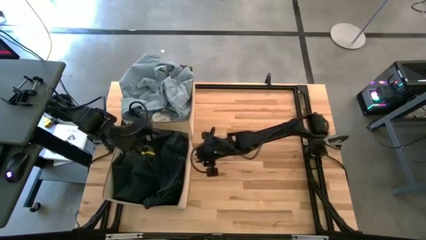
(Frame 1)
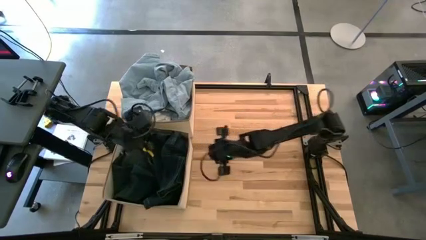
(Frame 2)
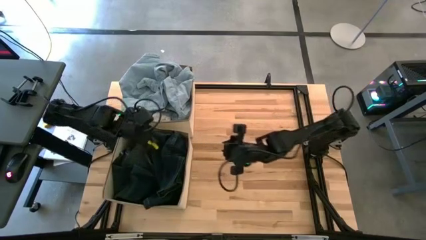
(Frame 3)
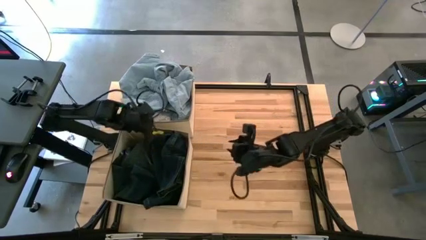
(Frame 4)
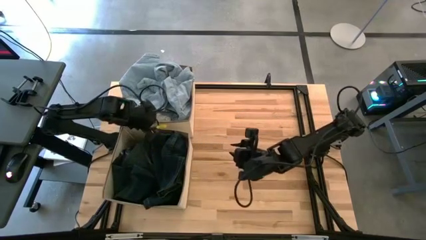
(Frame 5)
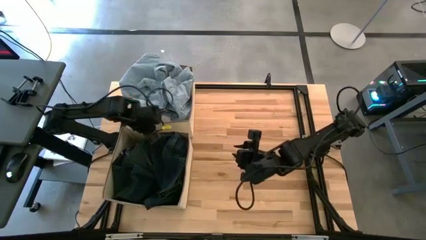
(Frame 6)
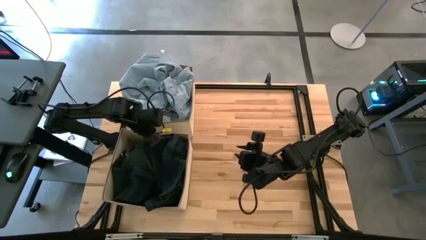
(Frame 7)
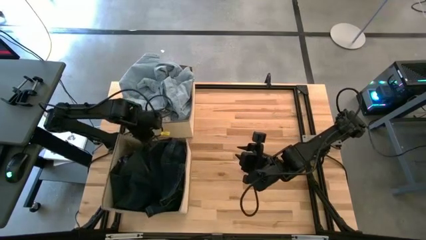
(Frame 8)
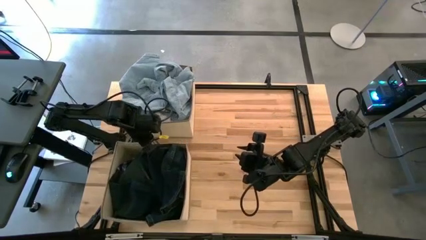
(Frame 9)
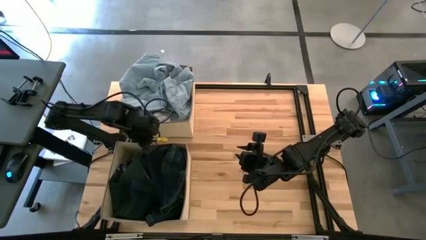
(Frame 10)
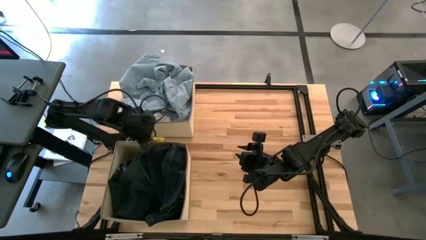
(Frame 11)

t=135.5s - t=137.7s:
Task: Sort clothes
Move the laundry organizer to the bottom

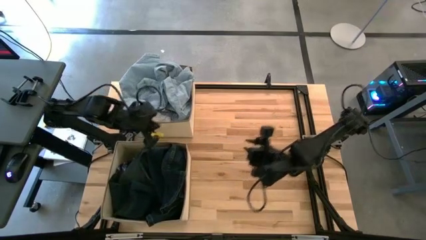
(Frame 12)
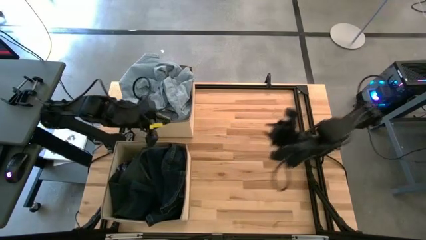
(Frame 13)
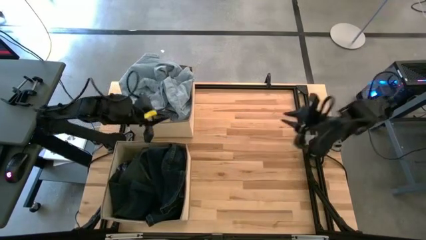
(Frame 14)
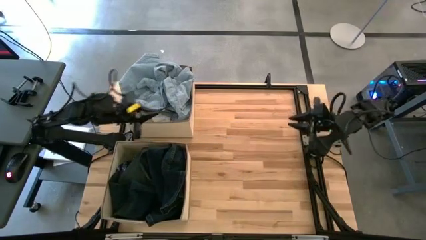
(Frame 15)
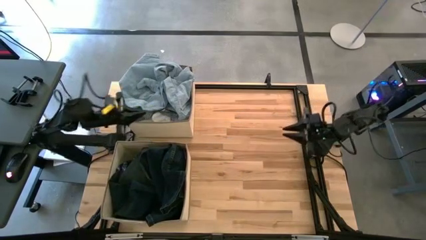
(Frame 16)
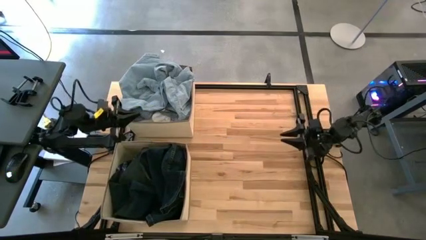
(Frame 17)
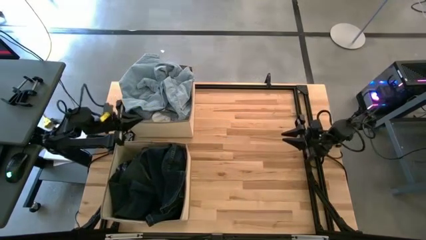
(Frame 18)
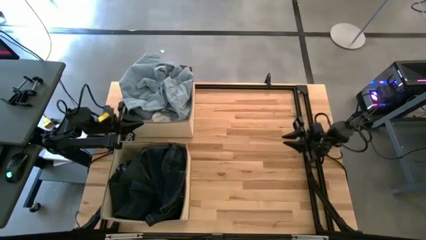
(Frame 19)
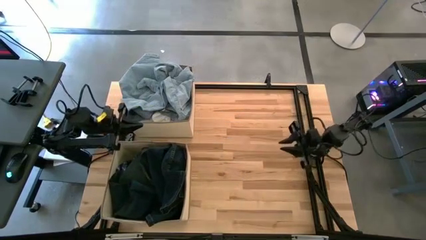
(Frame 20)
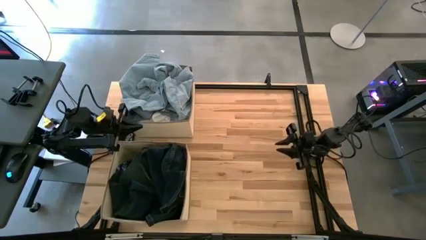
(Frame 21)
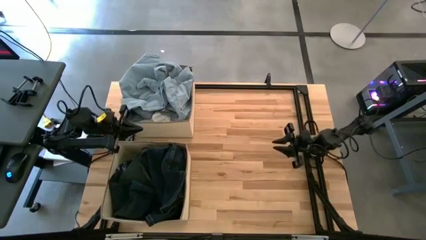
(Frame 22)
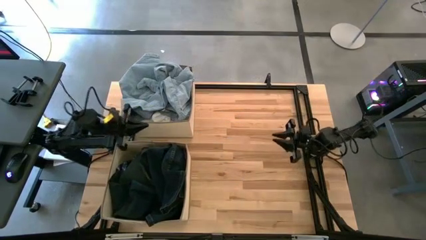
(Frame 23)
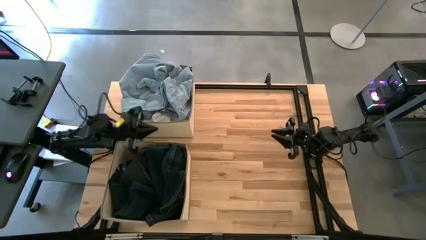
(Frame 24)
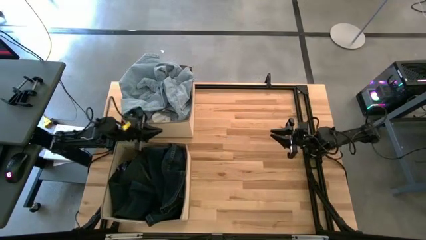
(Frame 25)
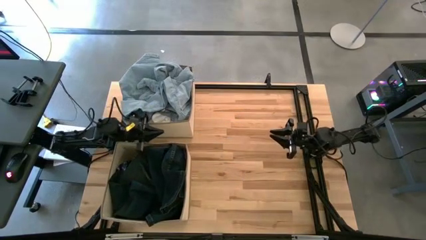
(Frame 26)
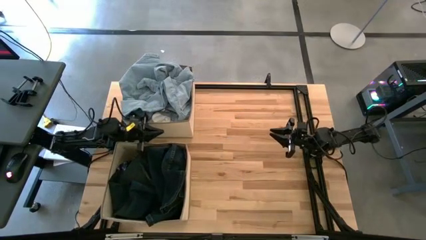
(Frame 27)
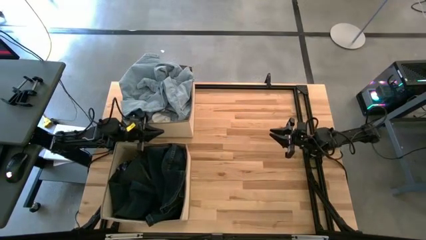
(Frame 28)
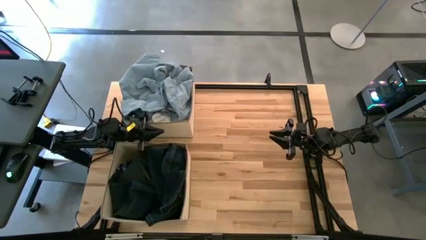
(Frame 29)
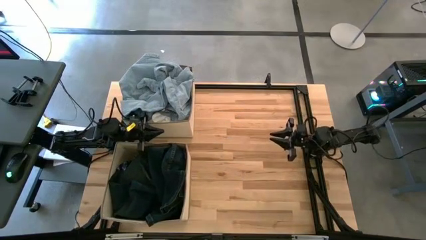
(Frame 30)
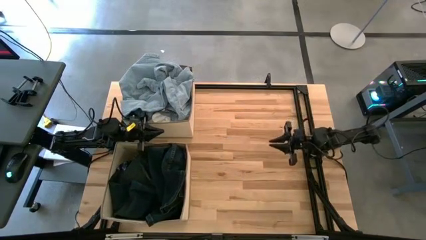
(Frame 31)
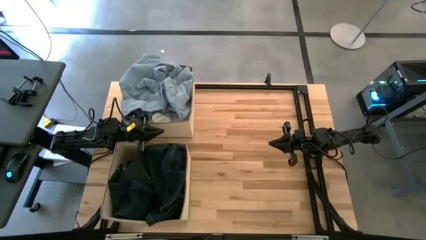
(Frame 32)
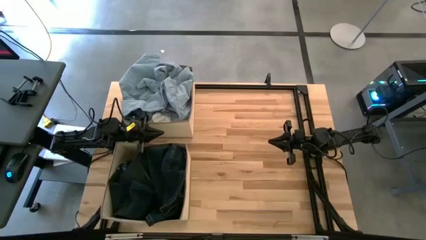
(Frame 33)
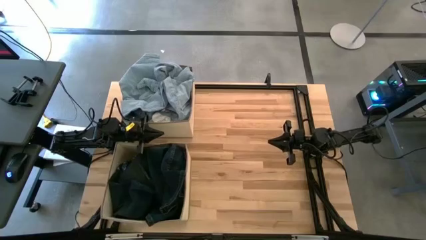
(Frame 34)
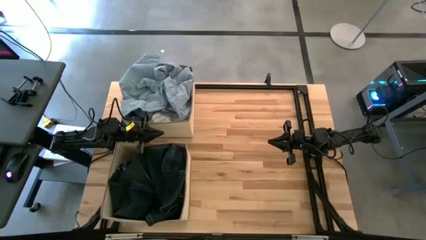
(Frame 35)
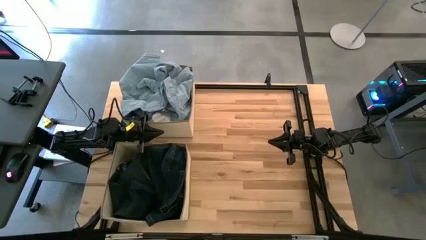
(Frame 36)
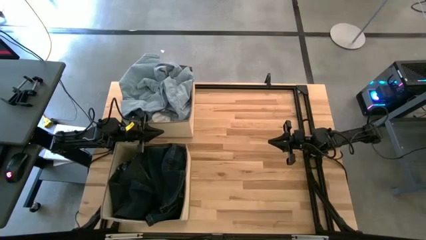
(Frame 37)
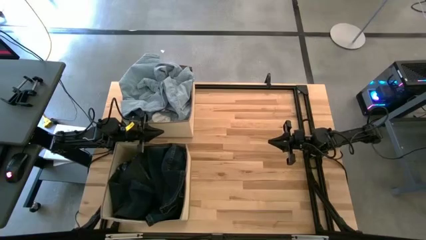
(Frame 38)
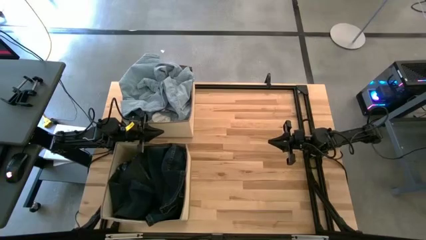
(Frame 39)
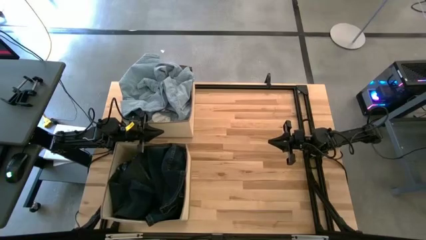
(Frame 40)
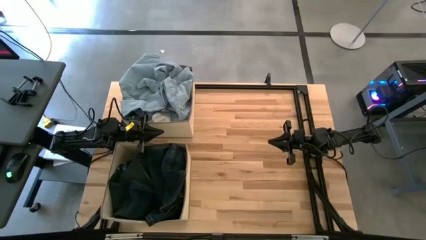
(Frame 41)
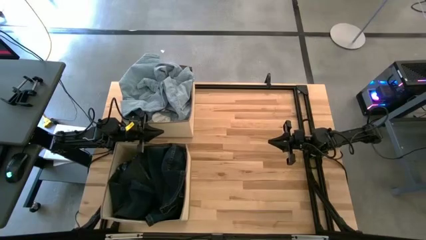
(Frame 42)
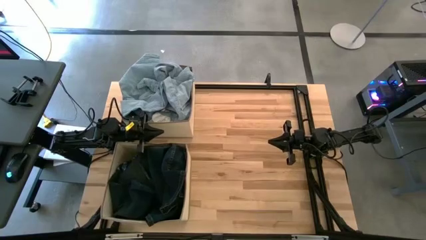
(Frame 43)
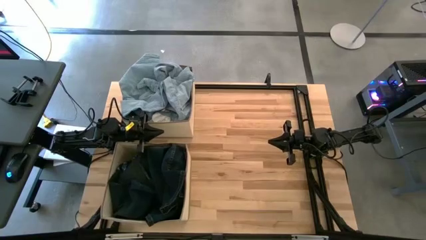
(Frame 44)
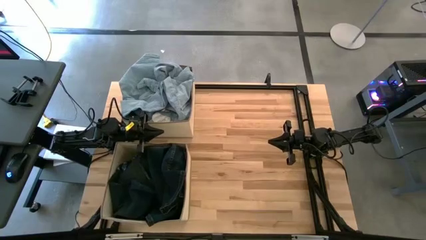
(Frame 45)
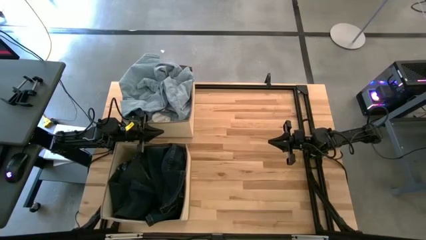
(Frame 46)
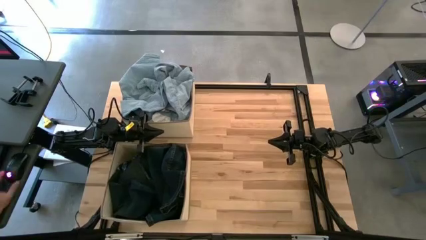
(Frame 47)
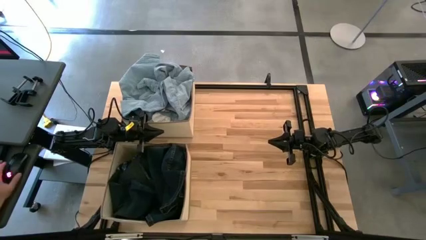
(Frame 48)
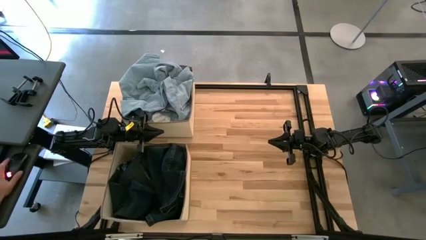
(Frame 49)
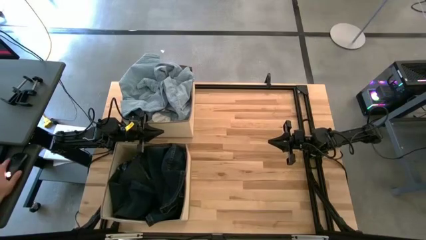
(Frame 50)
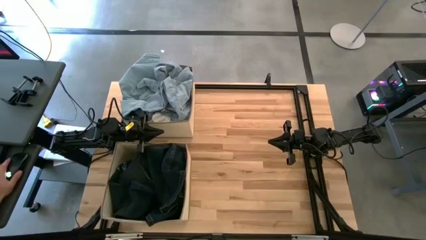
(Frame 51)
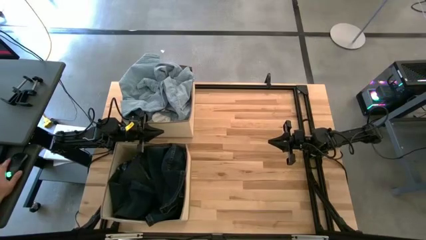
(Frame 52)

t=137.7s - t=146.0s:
Return to Home Position

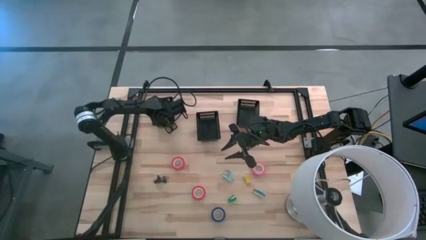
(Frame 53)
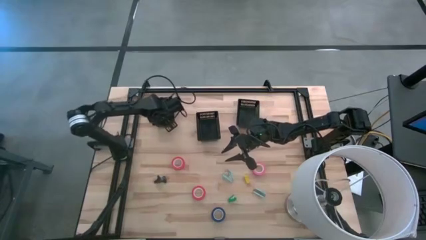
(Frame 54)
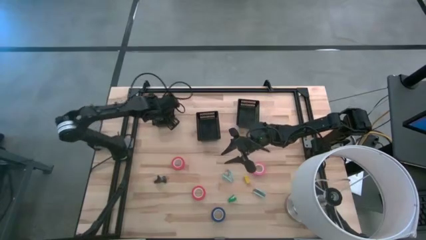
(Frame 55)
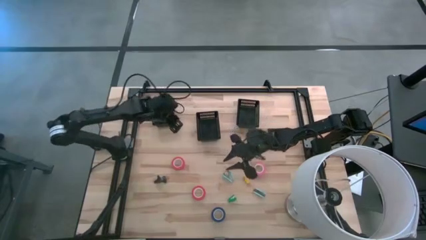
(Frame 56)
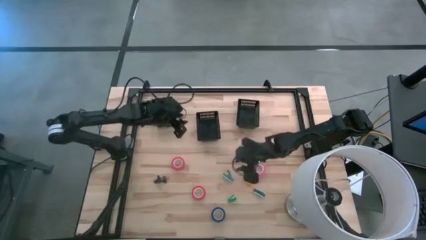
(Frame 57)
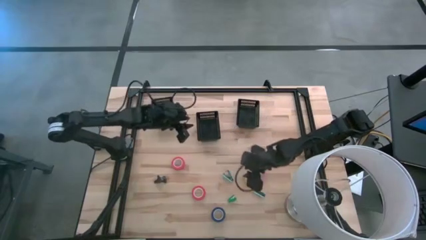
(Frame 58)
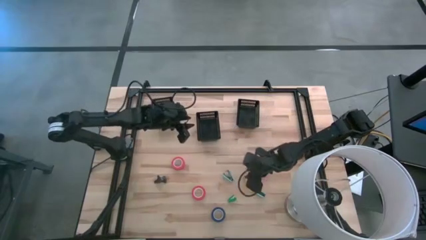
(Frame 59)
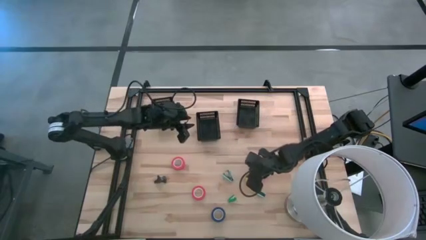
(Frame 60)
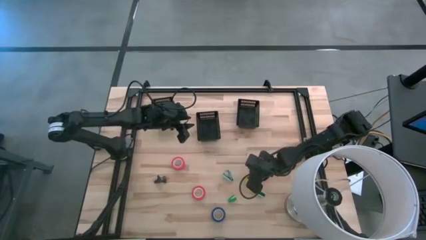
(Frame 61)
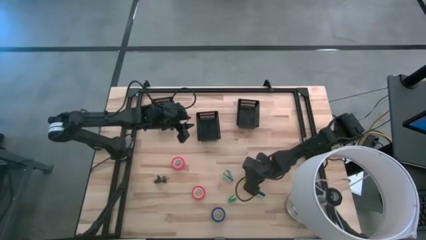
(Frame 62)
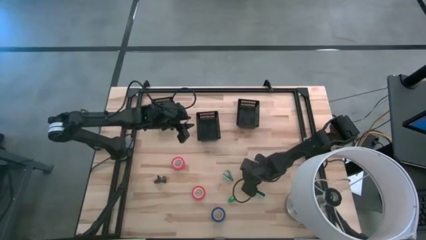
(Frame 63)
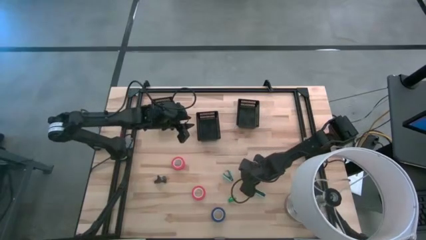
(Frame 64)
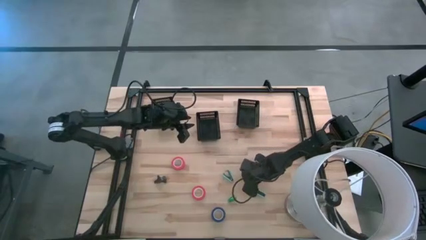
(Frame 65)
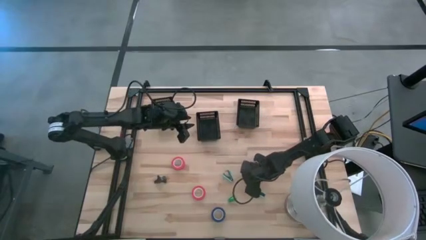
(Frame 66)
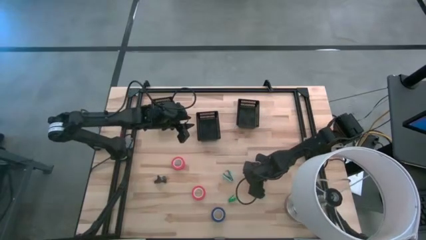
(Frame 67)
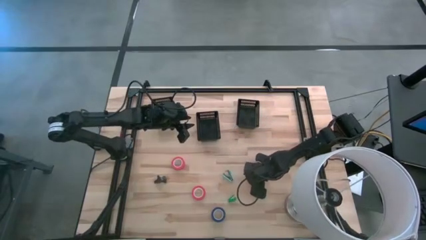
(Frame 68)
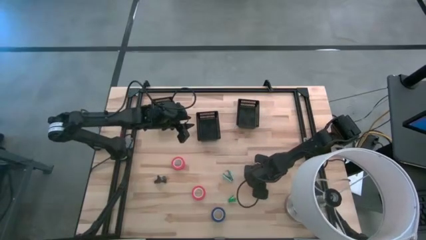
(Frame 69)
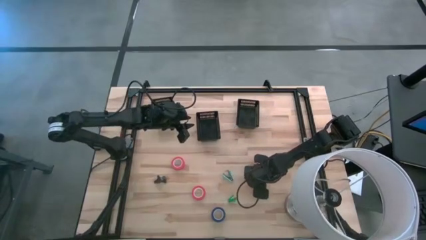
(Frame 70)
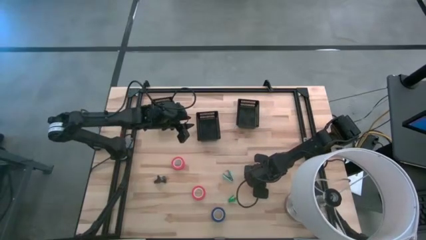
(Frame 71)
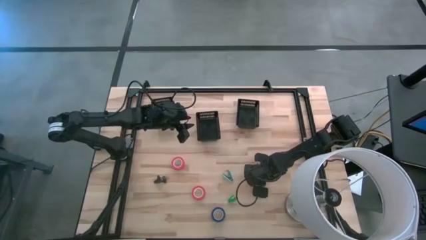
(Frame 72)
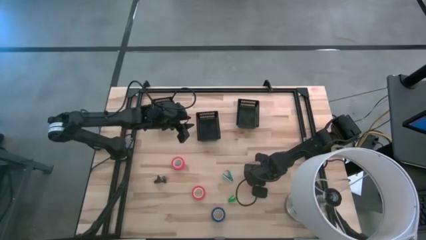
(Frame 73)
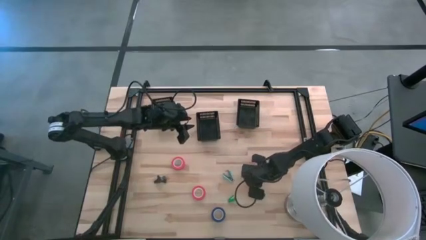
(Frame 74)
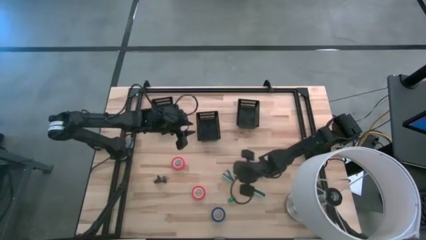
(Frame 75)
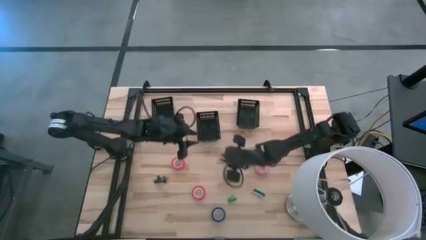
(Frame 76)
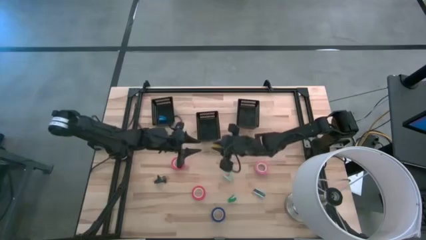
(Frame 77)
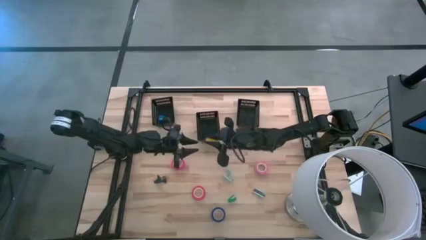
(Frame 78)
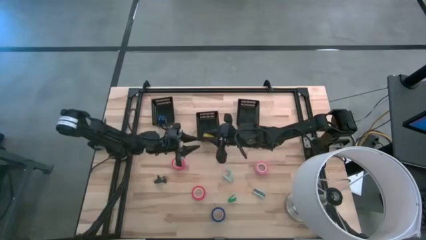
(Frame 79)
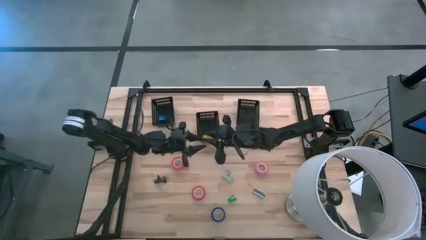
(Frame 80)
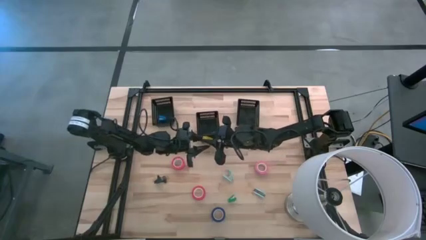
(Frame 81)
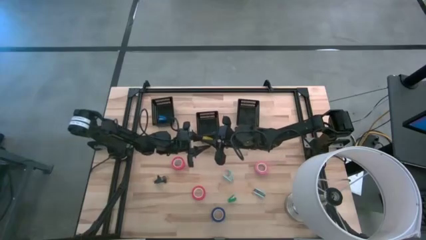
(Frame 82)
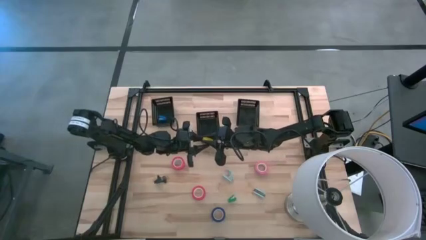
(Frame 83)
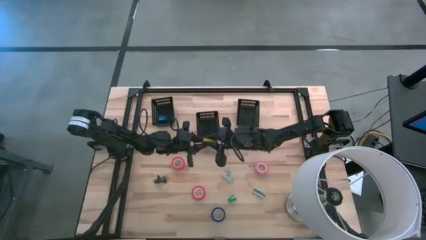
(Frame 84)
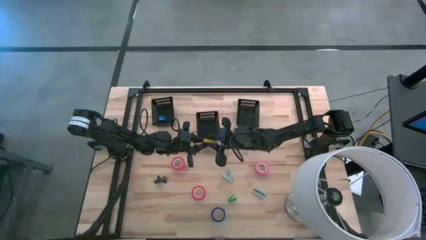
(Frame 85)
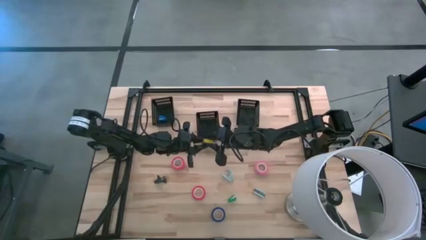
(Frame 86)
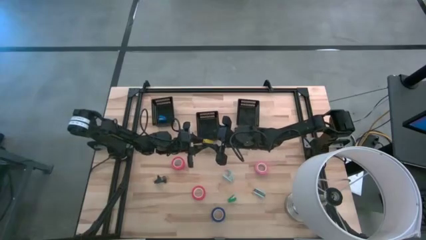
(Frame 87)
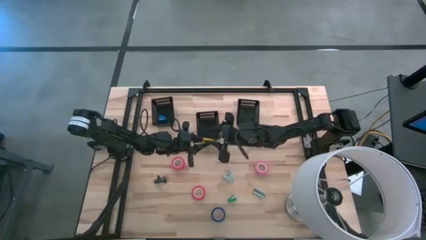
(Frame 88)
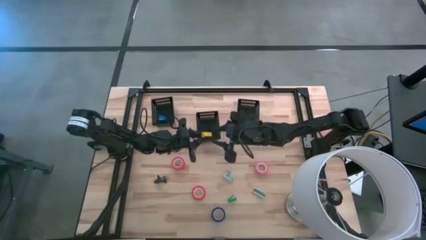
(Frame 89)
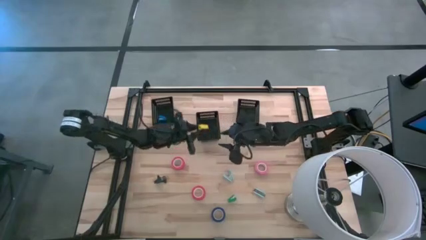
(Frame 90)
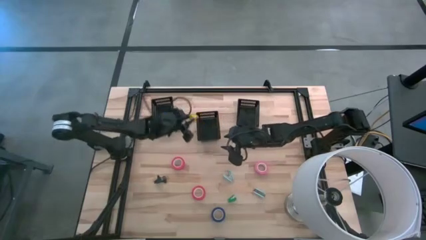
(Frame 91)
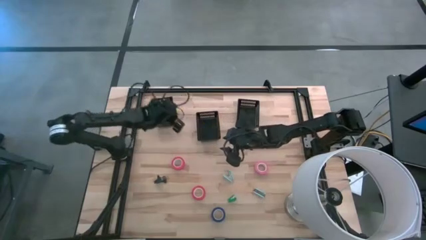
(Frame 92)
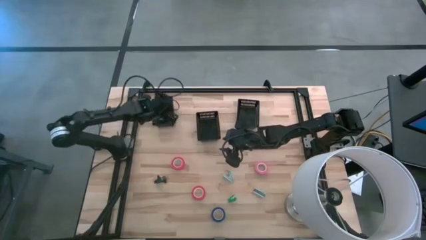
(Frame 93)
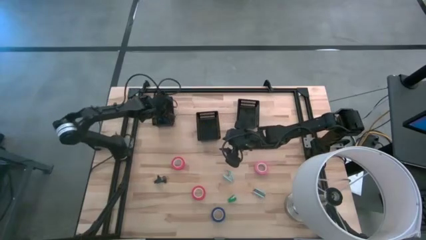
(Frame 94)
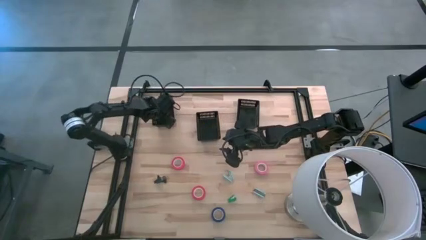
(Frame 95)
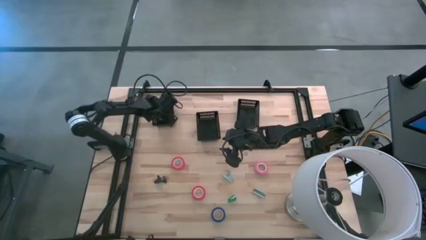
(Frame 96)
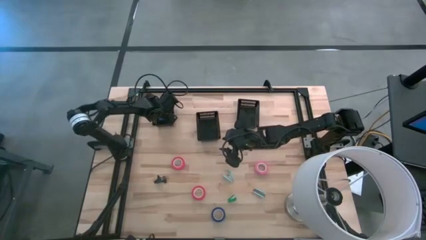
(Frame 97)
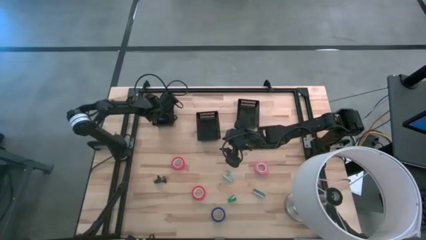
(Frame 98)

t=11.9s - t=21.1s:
Task: Pick and place Stapler, Stapler remover, tape
Put the yellow stapler into the left black bin
